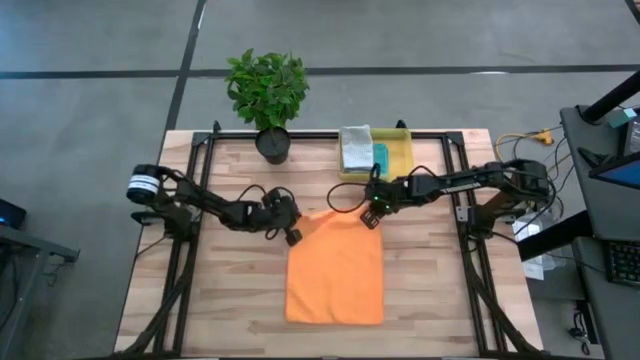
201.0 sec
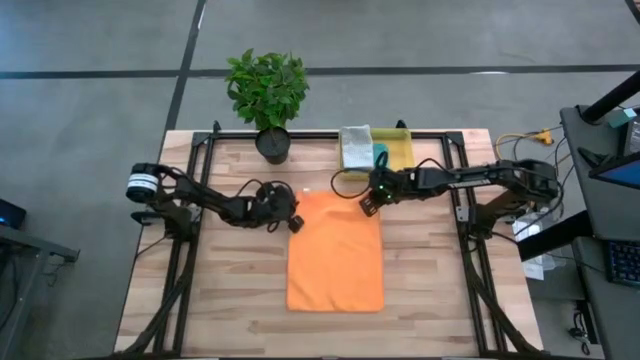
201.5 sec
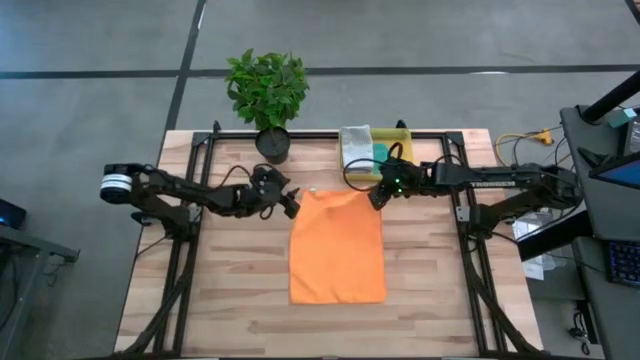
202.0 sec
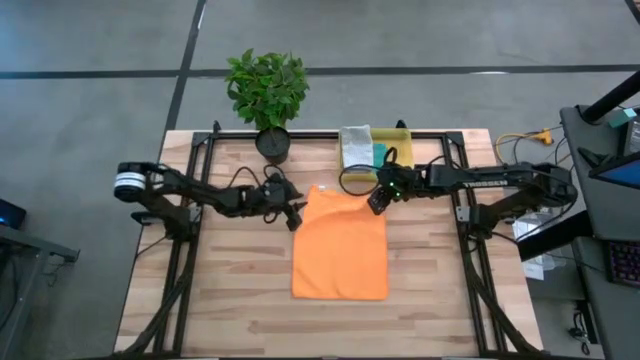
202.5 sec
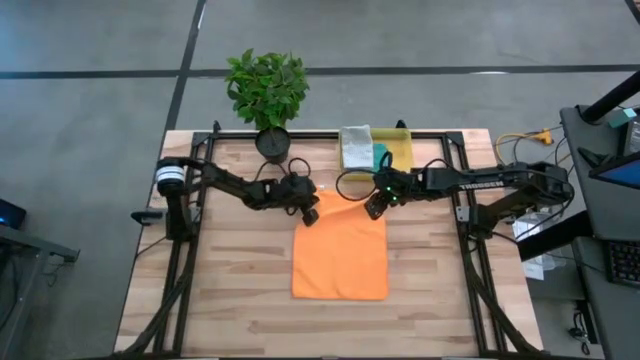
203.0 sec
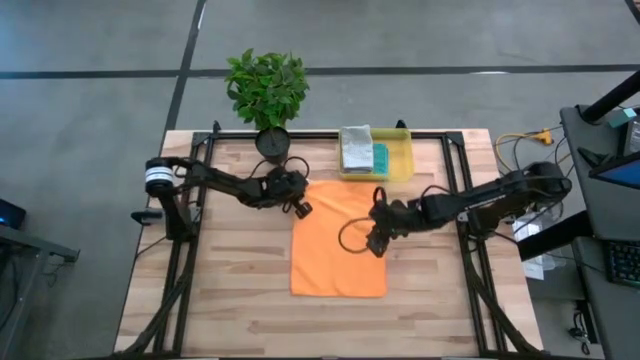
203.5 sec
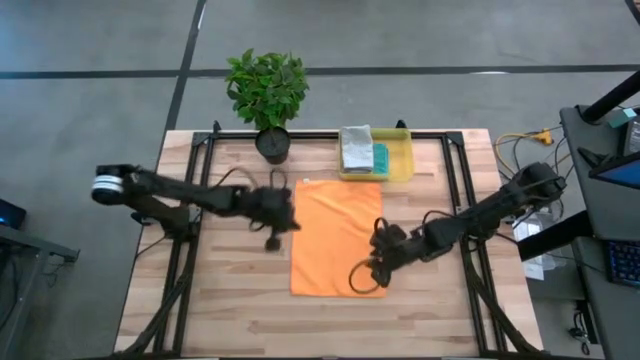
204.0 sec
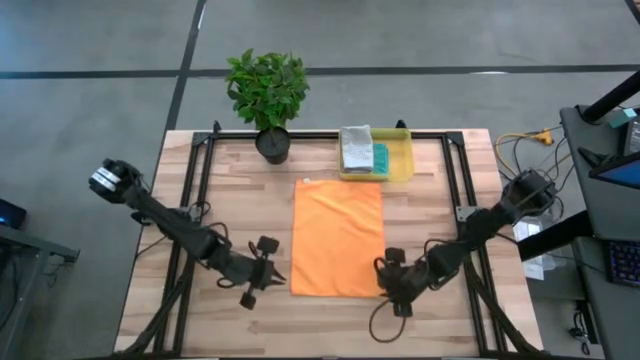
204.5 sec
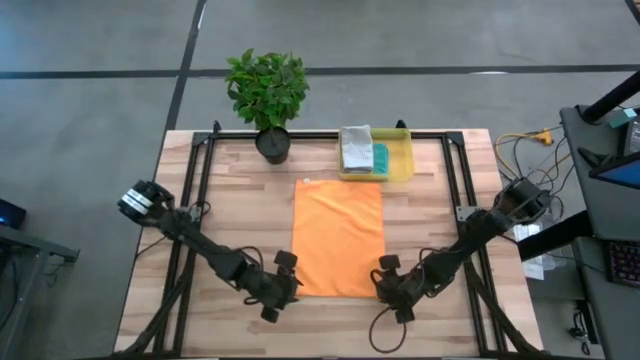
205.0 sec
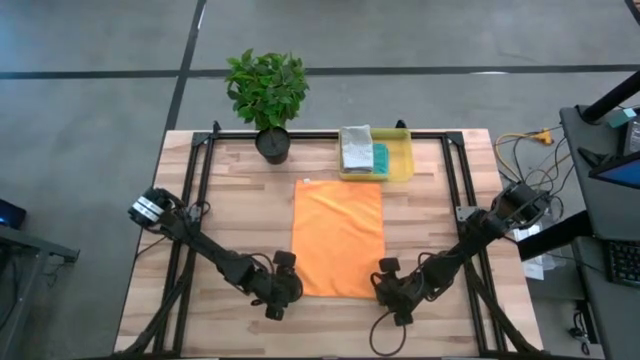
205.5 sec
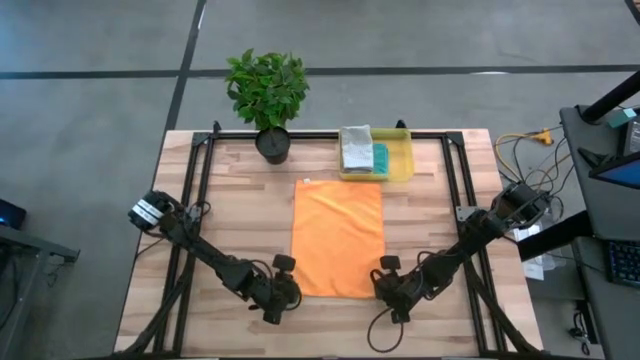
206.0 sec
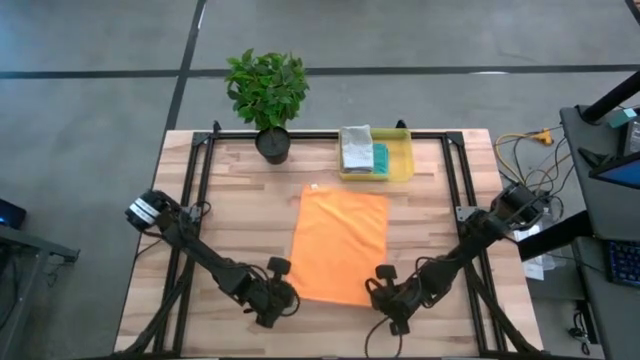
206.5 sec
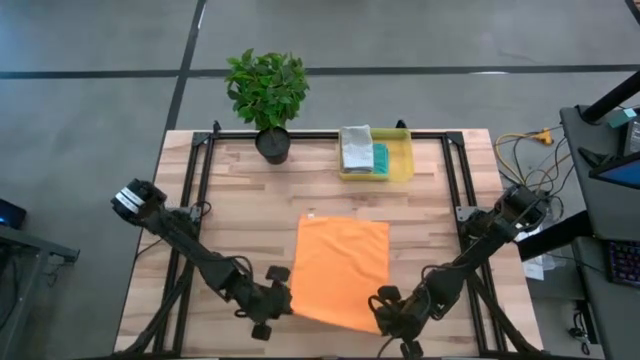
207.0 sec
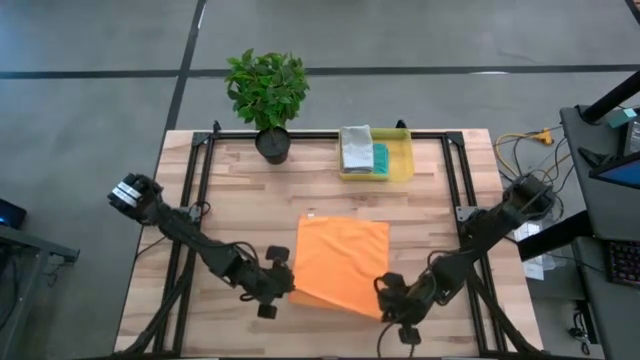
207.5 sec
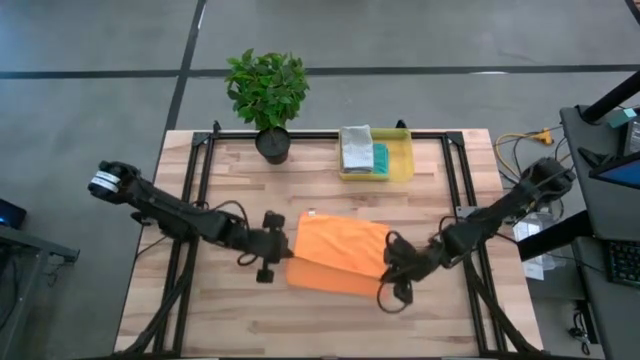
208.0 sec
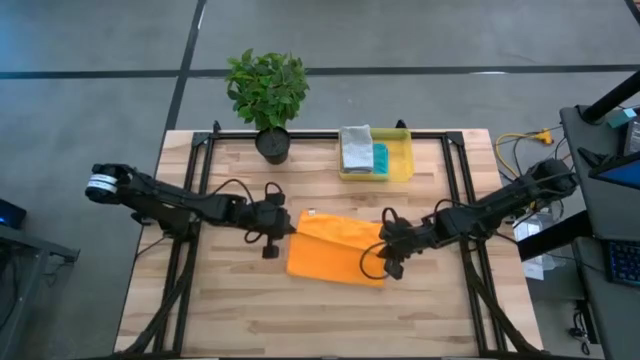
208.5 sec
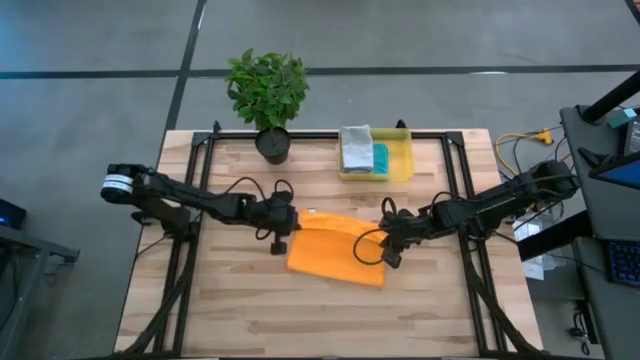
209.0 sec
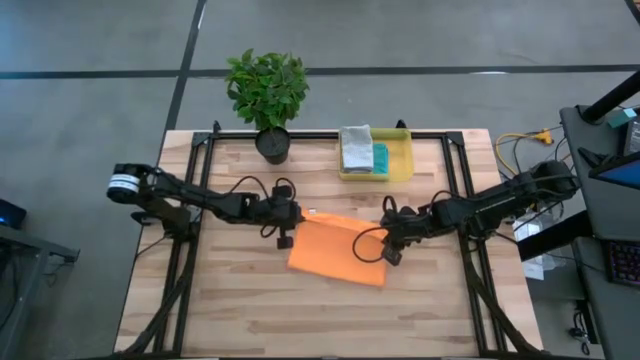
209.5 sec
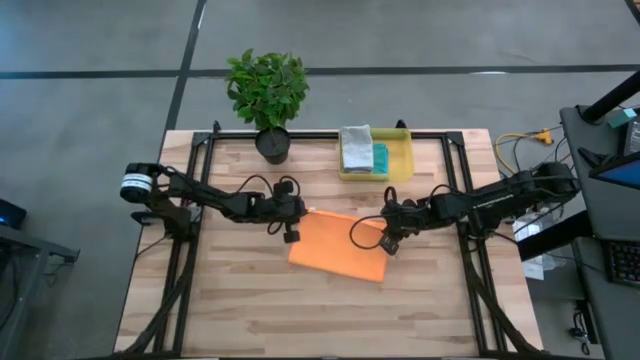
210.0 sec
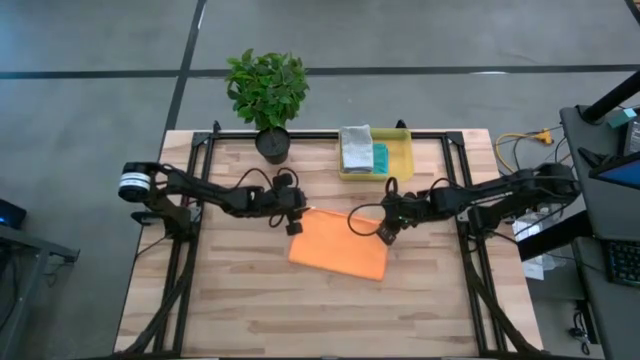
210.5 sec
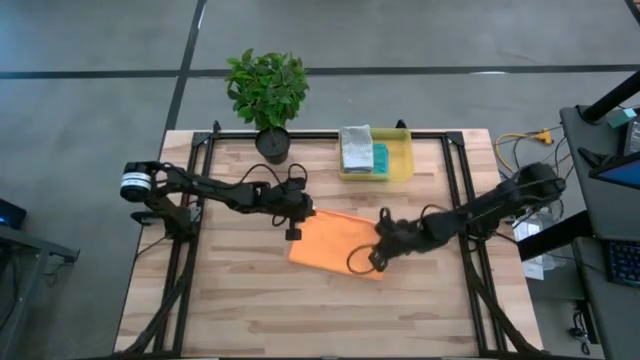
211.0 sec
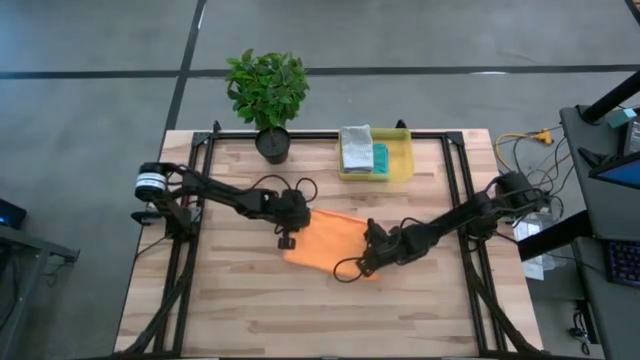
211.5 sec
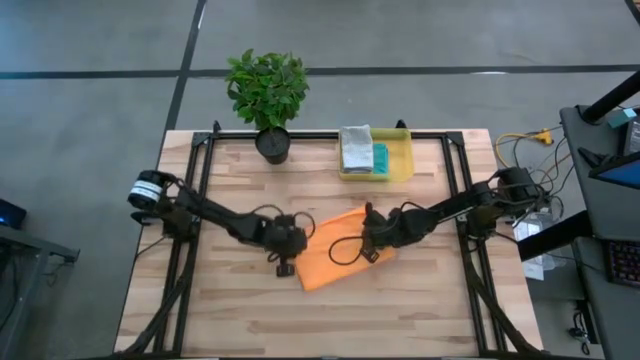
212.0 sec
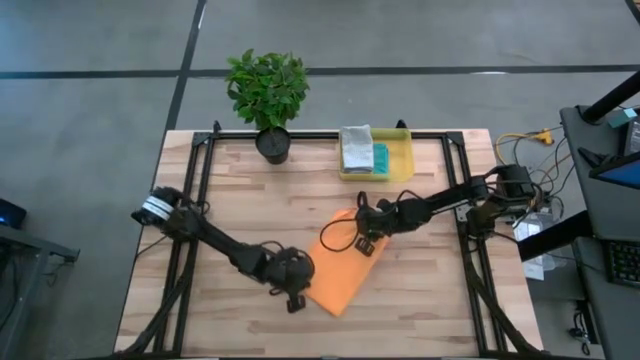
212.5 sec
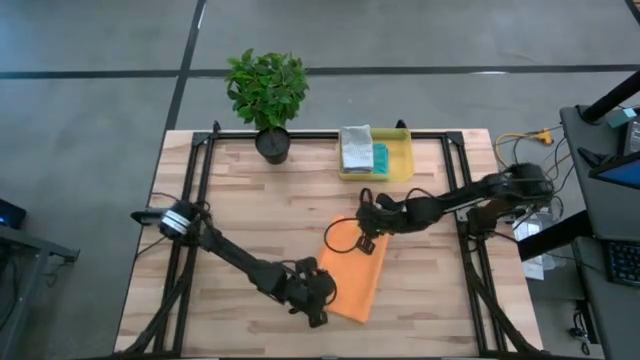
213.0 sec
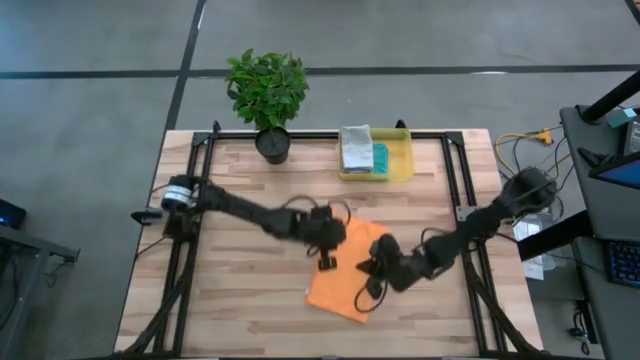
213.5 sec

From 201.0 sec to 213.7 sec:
Task: Fold microfiber towels
Fold the orange microfiber towel

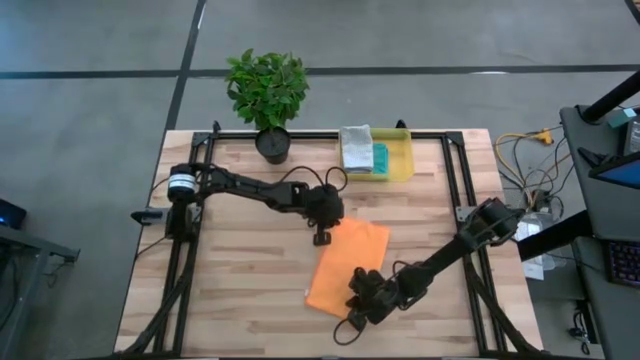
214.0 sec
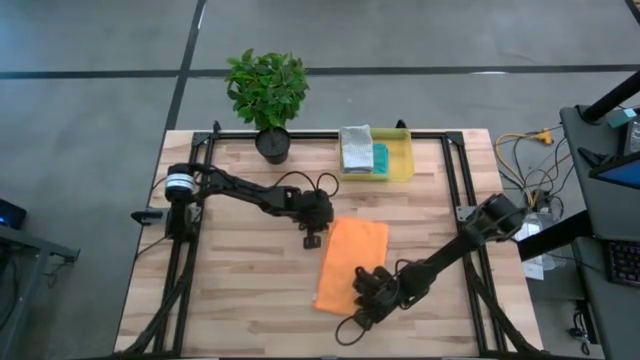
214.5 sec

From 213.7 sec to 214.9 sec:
Fold the orange microfiber towel

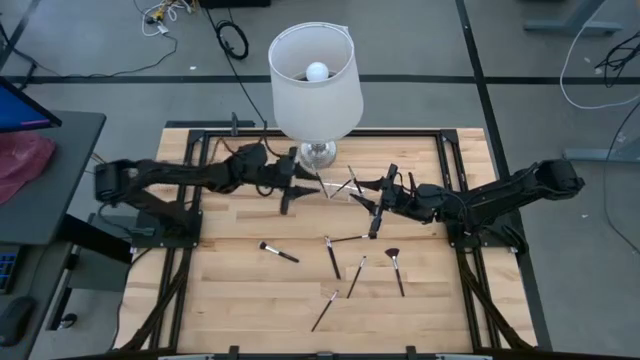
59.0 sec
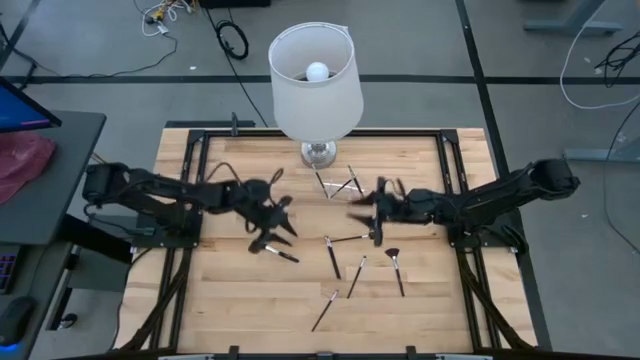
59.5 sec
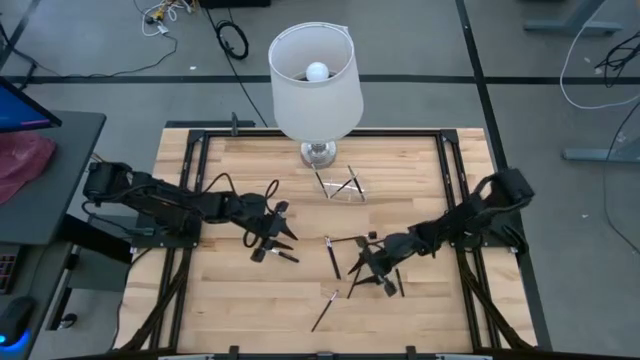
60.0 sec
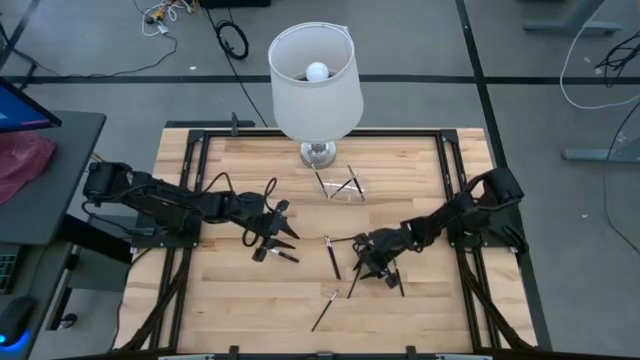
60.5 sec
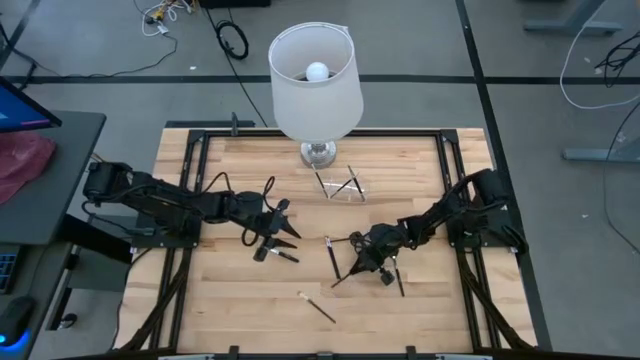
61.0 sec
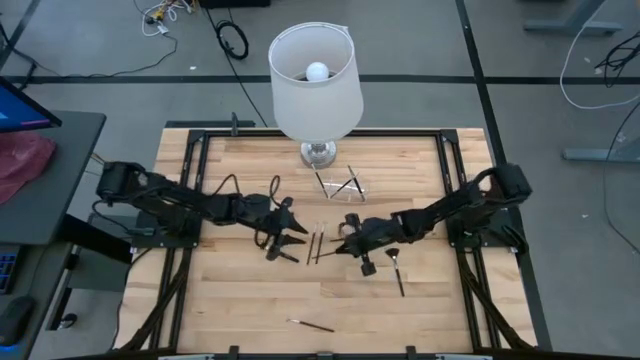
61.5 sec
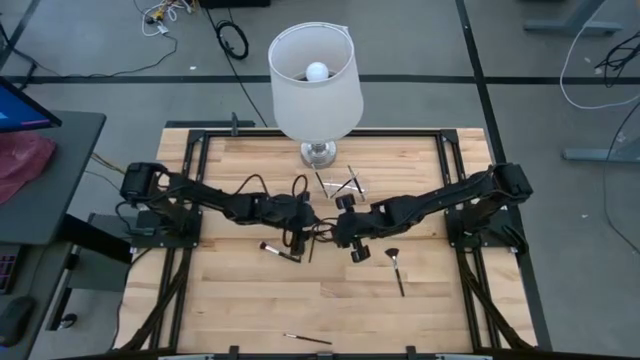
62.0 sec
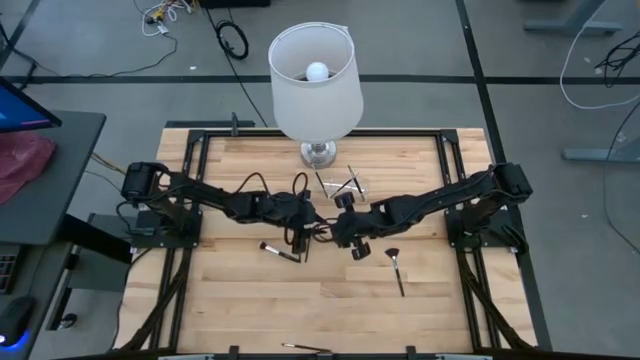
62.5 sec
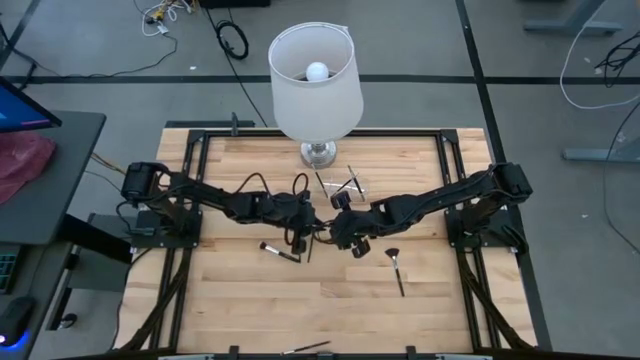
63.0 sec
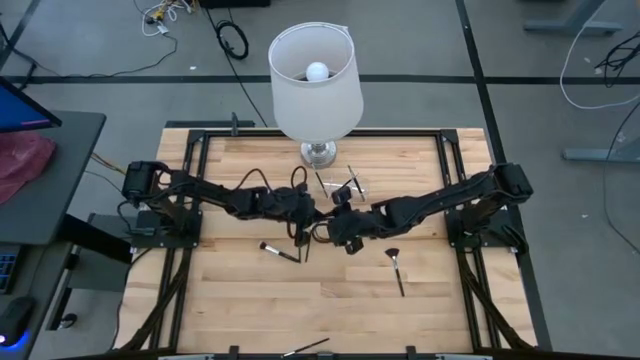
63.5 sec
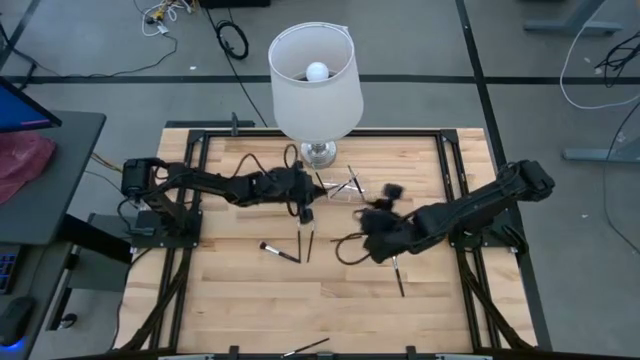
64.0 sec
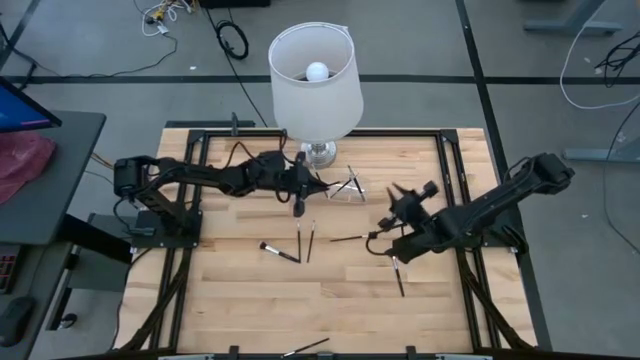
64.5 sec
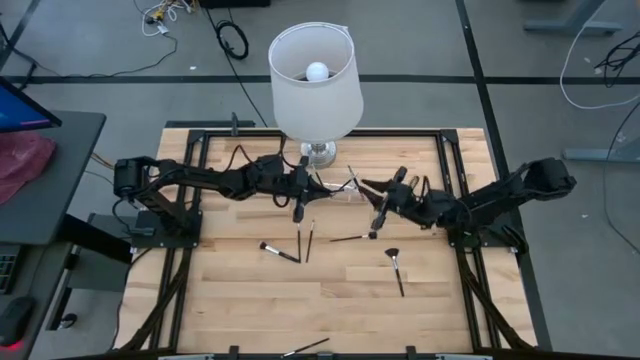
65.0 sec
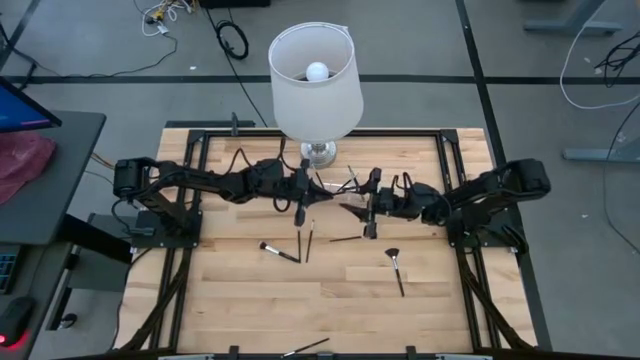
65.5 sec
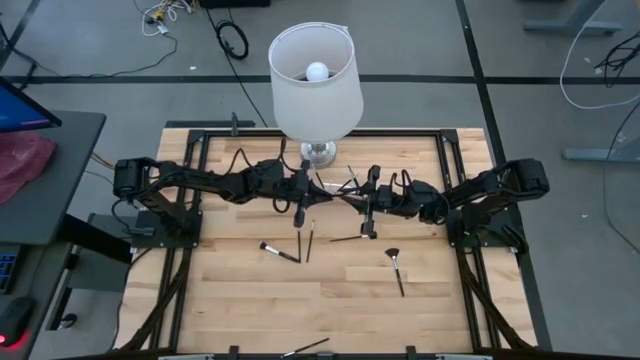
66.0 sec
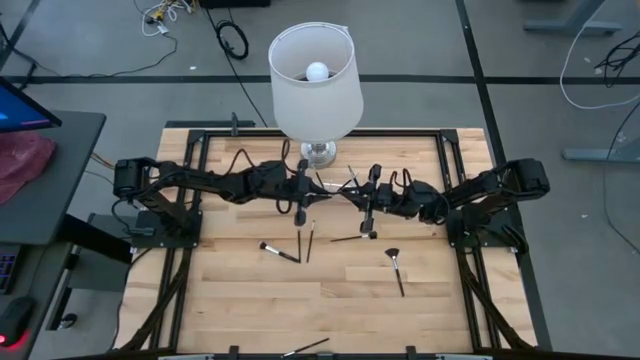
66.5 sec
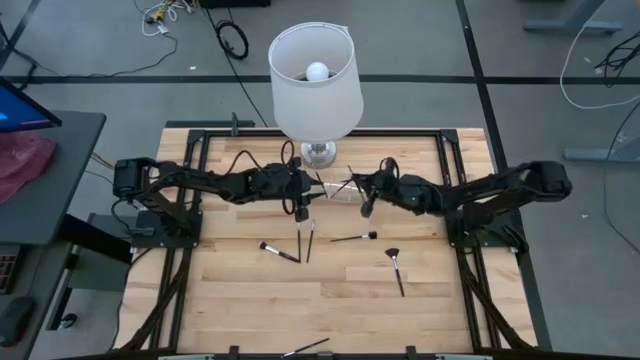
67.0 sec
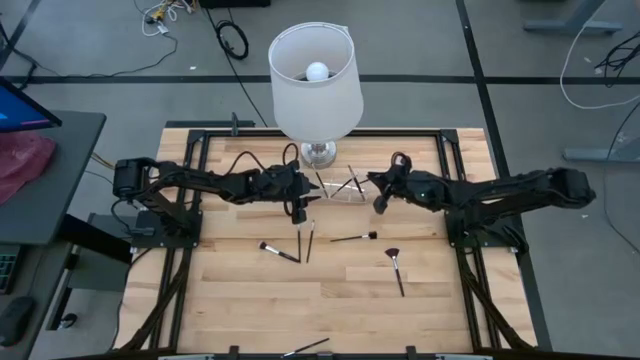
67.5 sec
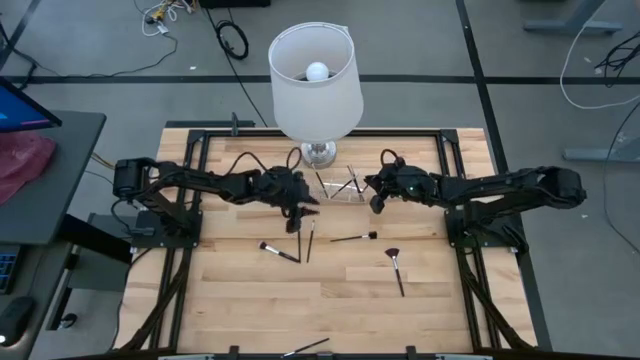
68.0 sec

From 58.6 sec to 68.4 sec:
Task: Put items in baskets/containers
Put the black eyeshadow brush into the transparent organizer
